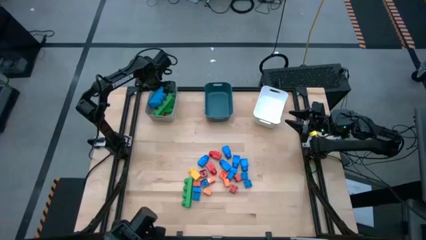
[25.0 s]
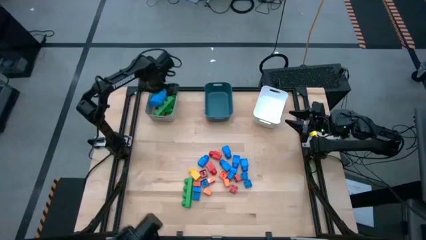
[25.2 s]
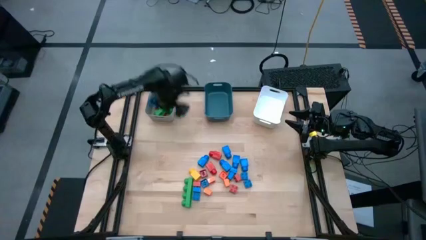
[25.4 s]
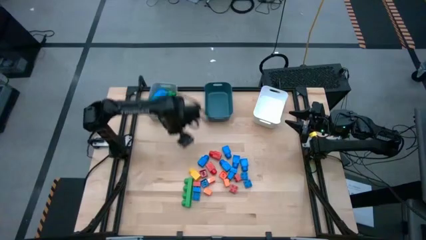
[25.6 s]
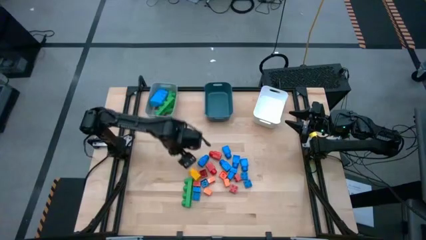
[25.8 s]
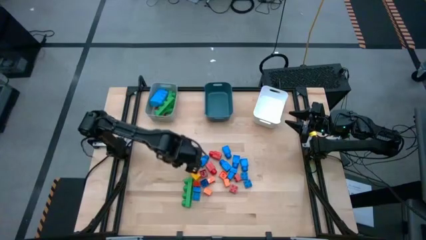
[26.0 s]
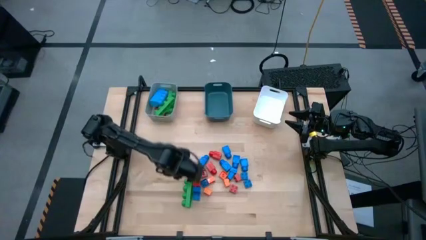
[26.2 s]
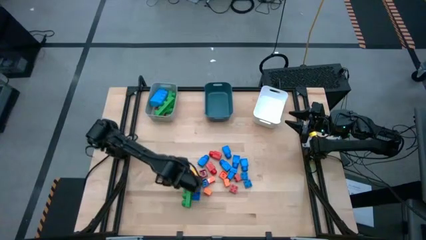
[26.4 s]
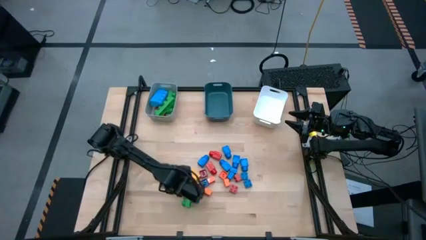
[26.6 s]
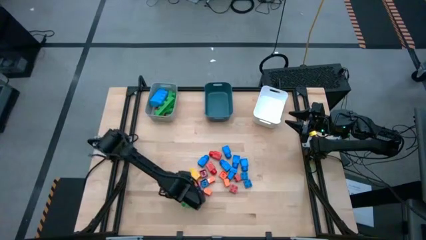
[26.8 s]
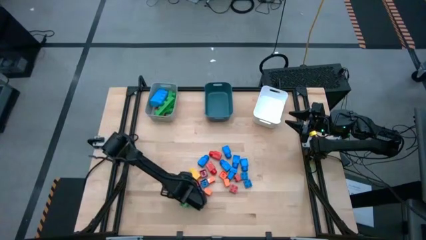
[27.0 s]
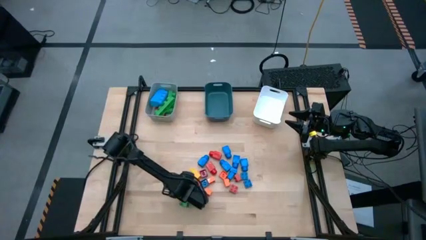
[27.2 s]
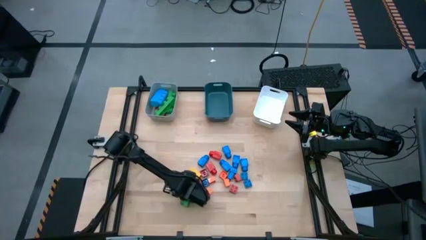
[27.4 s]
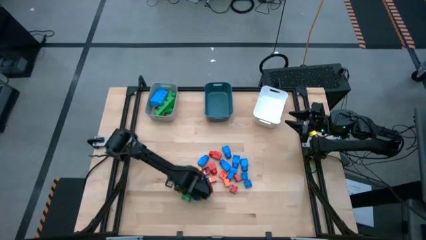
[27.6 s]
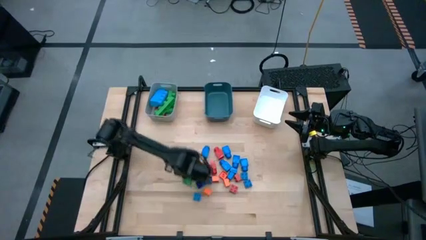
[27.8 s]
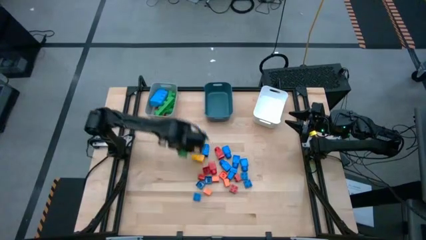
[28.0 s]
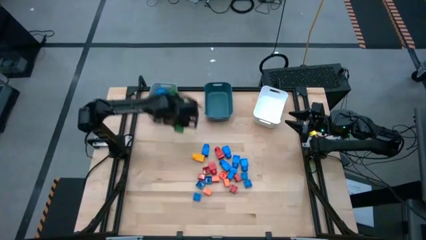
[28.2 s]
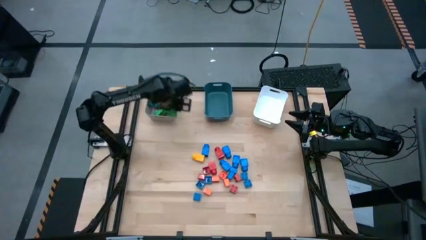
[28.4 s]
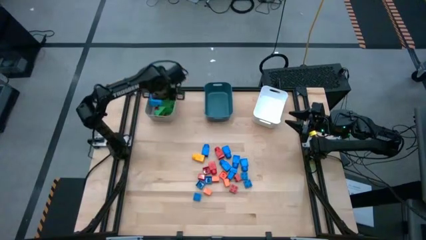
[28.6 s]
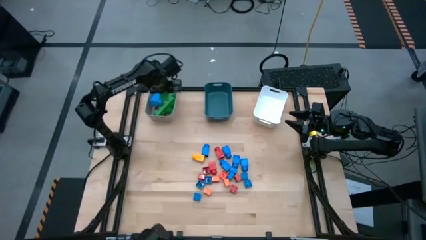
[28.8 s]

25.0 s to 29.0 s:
Task: Sort blocks by size
Put the large green 4 stud game piece into the gray bin

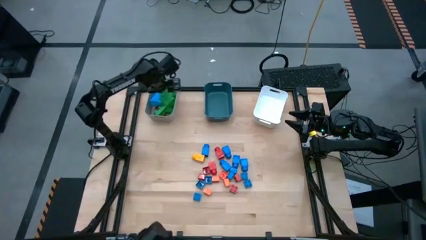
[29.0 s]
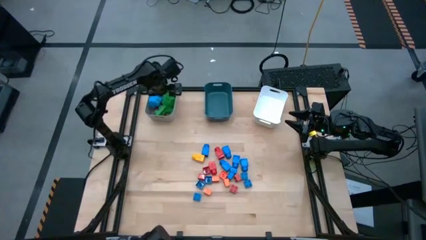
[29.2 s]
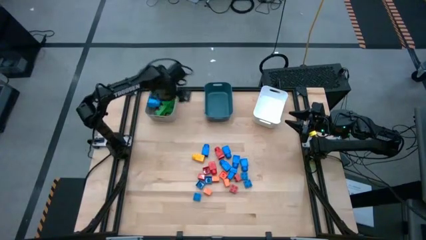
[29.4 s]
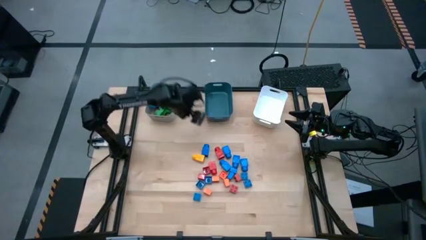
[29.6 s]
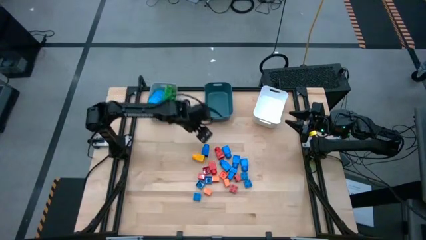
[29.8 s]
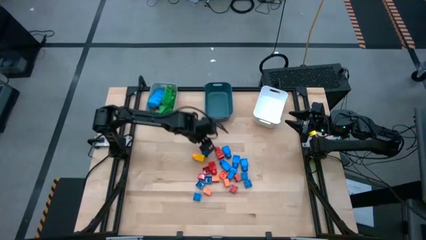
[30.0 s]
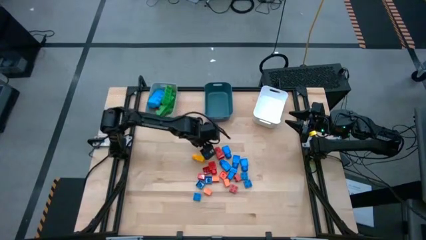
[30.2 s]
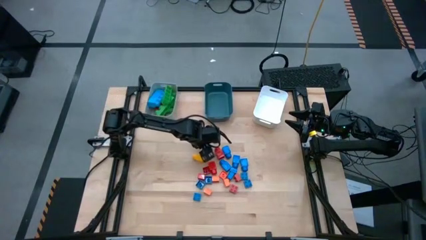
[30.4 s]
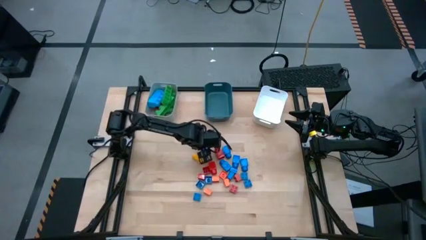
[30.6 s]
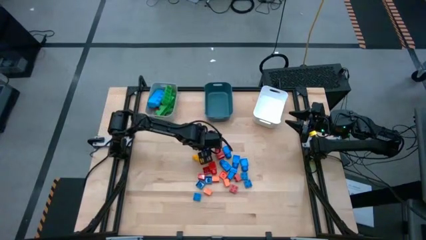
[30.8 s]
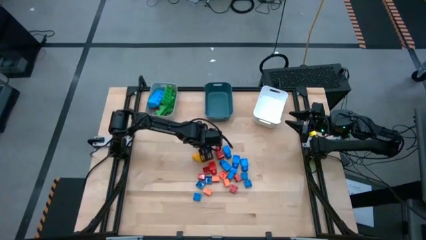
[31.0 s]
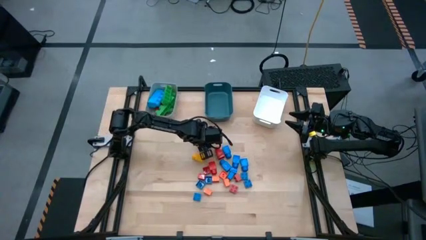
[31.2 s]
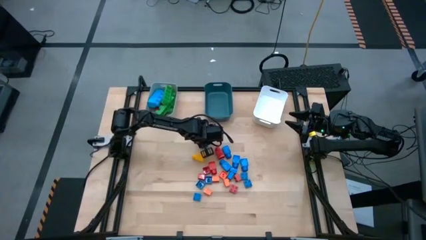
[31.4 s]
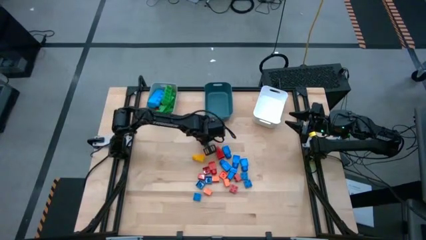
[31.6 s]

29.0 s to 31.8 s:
Put the blue 1 stud game piece into the blue bin

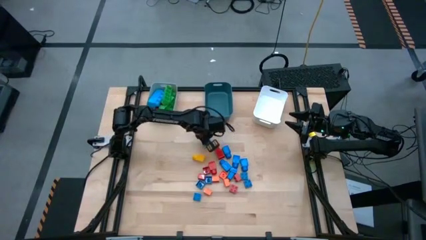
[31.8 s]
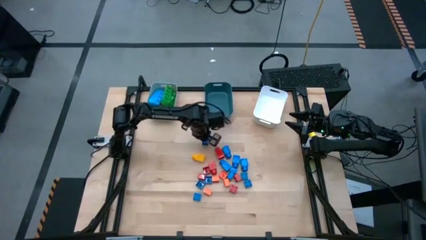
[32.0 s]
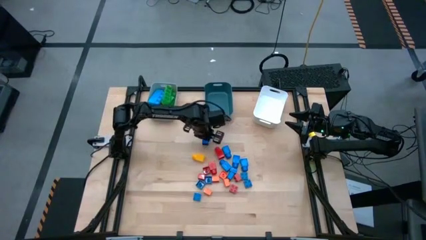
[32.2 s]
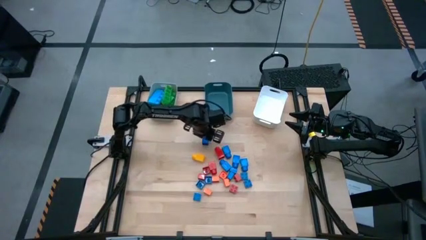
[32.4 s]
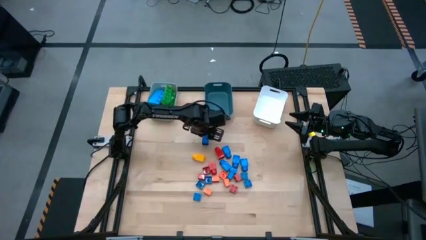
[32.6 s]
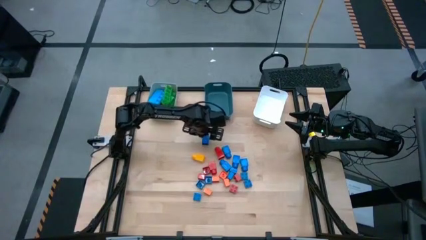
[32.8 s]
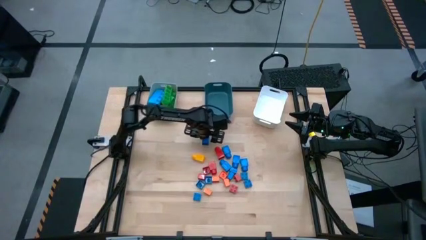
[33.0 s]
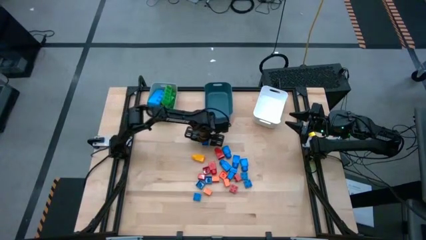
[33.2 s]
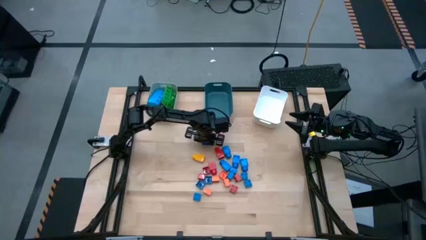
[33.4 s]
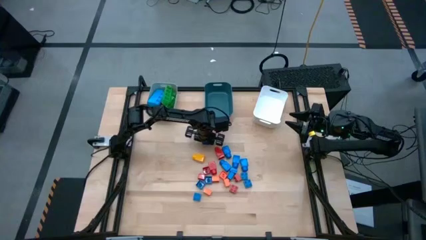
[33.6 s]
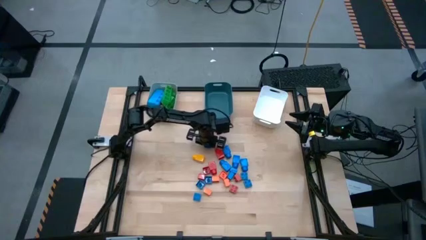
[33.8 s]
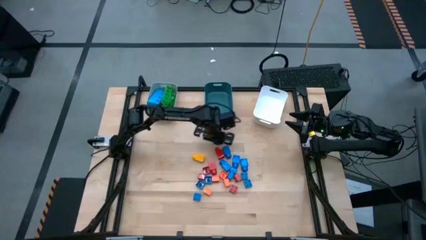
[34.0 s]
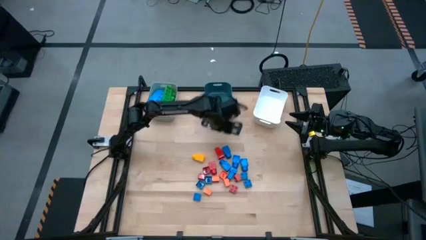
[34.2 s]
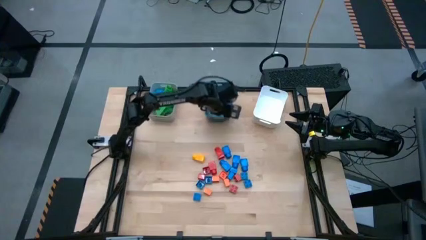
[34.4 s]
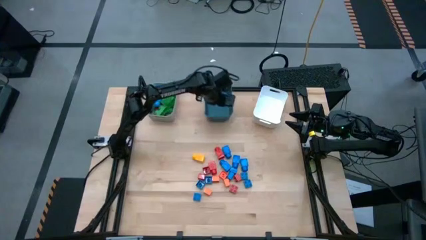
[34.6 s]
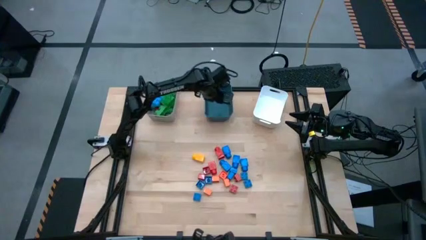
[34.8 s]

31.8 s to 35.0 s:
Put the blue 1 stud game piece into the blue bin

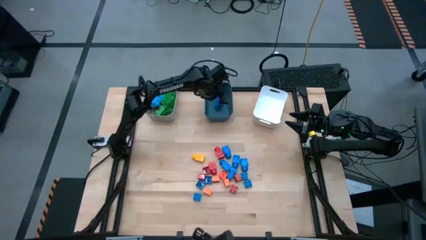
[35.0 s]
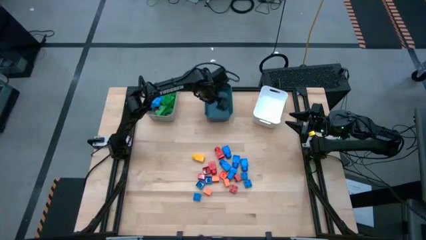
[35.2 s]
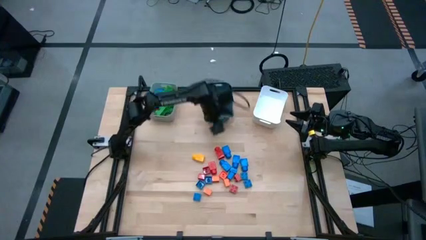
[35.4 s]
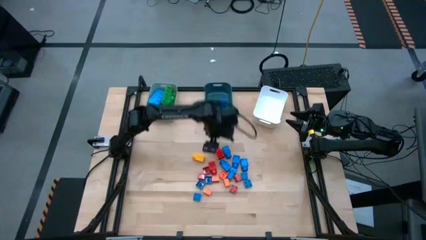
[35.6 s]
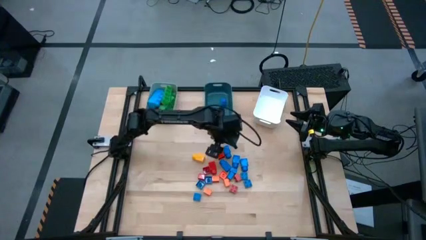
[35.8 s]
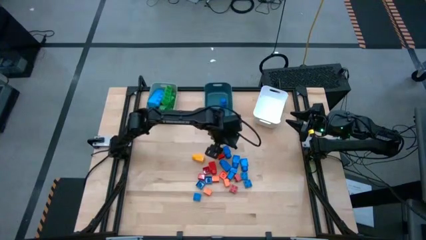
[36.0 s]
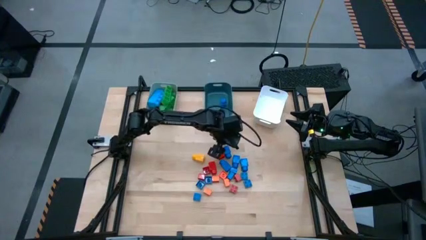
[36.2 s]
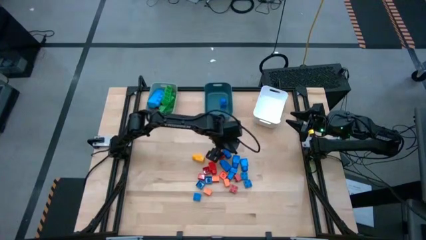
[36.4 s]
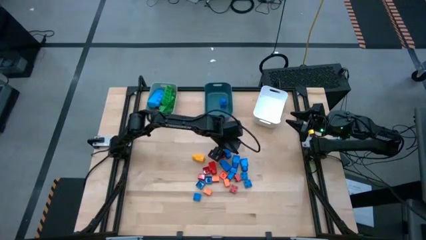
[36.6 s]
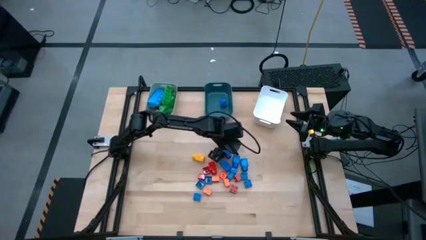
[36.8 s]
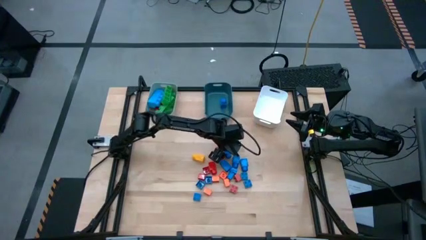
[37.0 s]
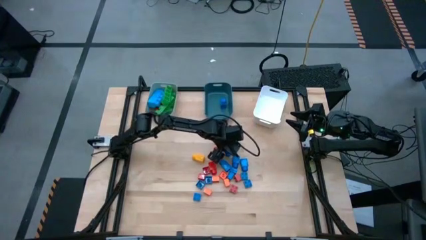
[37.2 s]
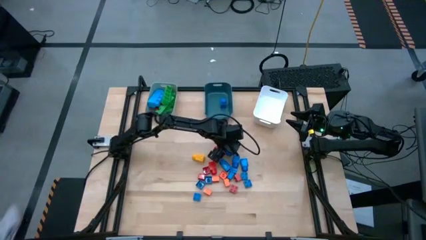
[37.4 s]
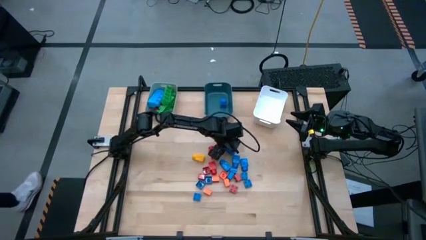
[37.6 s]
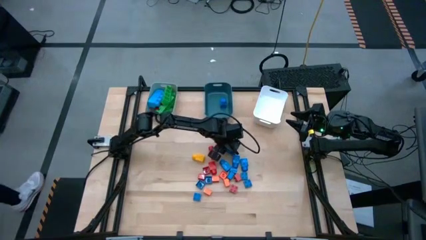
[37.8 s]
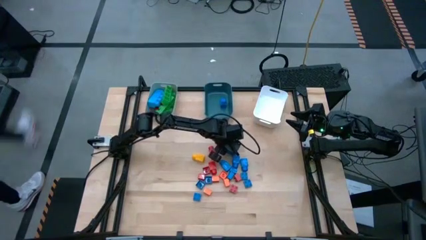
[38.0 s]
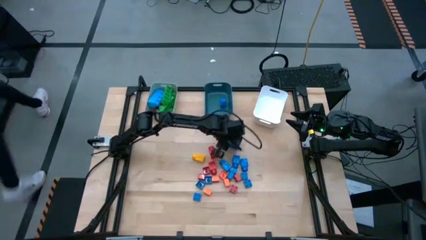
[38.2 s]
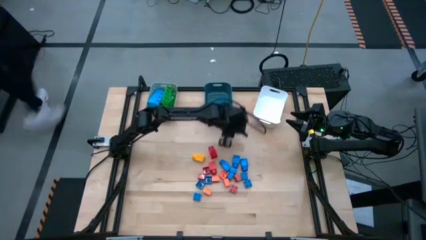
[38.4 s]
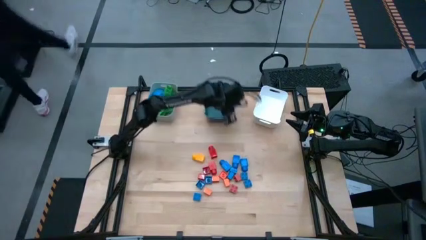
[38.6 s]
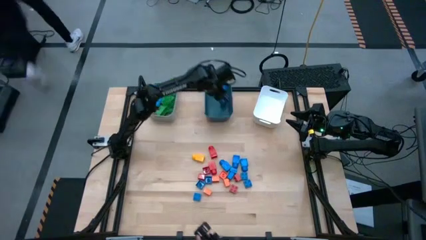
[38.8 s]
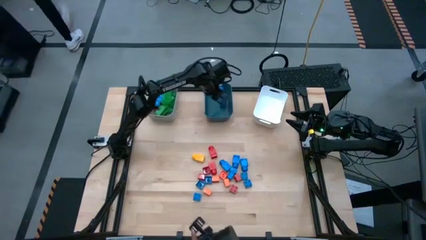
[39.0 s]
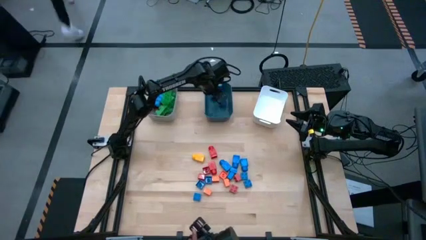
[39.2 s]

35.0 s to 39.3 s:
Put the blue 1 stud game piece into the blue bin

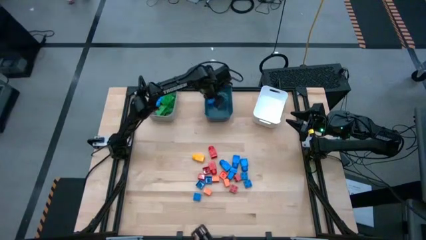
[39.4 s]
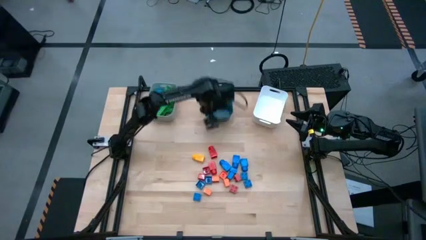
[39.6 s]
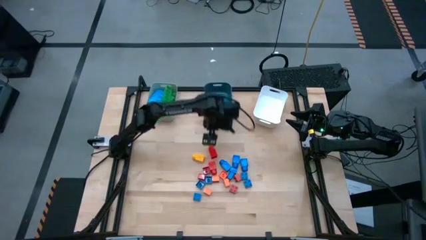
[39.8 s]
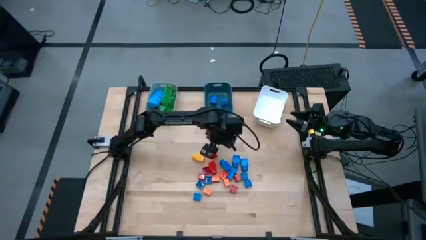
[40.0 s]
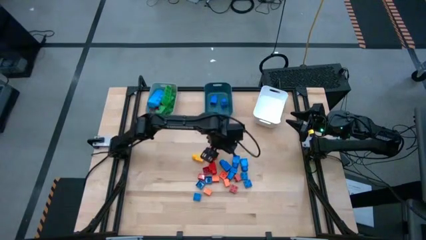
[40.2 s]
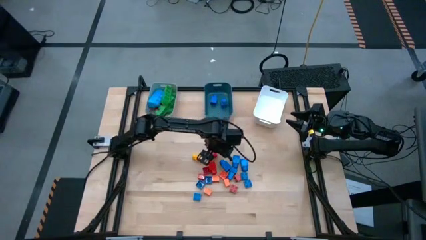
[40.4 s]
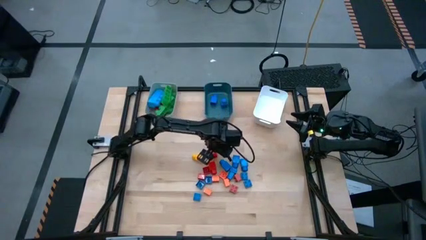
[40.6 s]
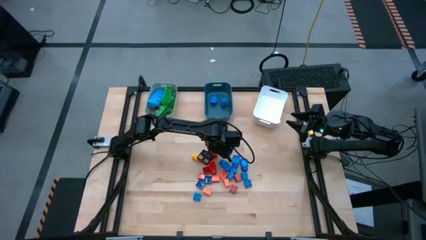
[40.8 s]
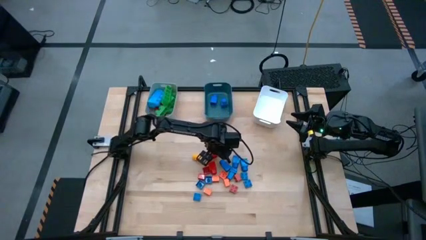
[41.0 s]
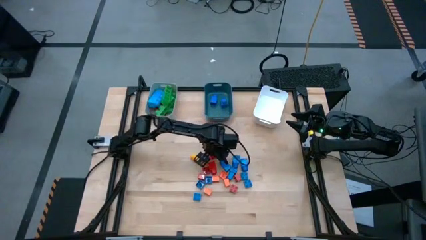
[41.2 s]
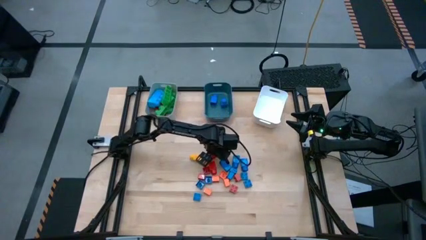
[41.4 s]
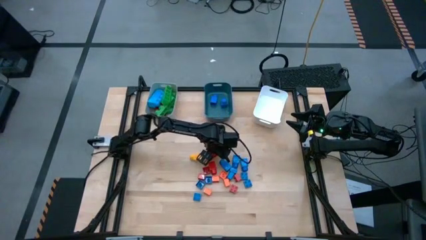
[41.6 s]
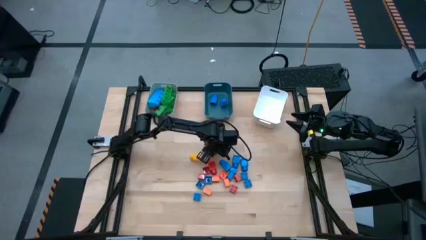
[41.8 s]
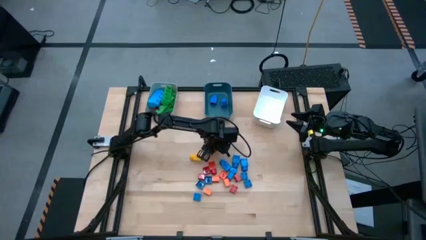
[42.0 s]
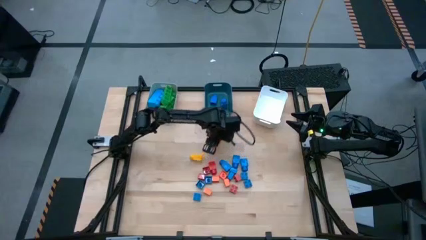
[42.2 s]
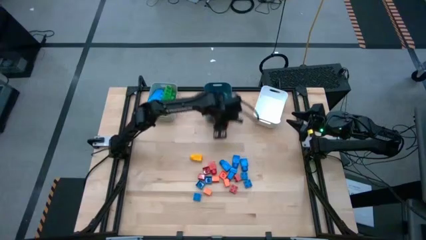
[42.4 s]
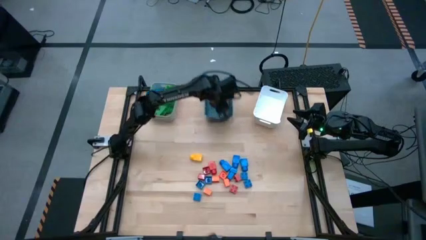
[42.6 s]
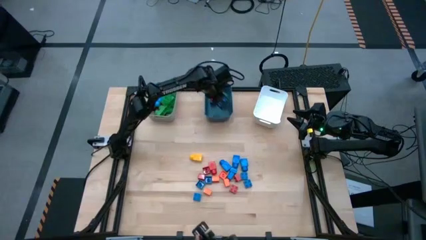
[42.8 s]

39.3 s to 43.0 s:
Put the red 1 stud game piece into the blue bin
